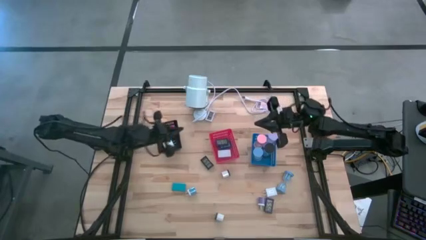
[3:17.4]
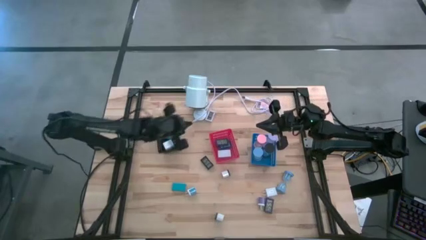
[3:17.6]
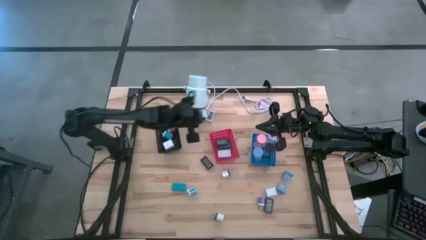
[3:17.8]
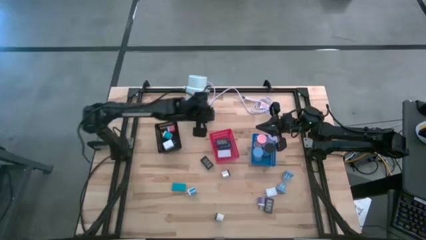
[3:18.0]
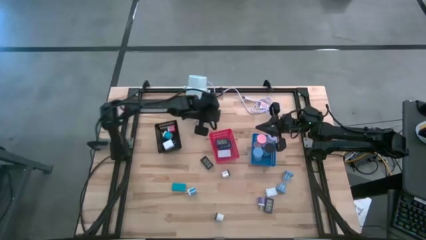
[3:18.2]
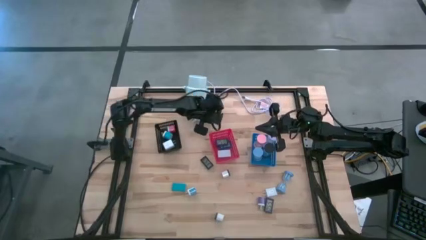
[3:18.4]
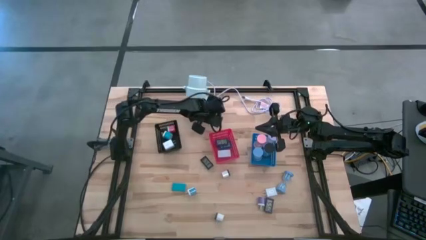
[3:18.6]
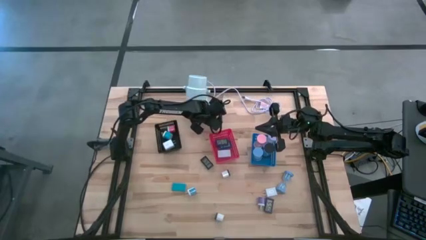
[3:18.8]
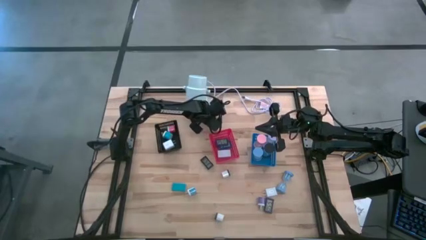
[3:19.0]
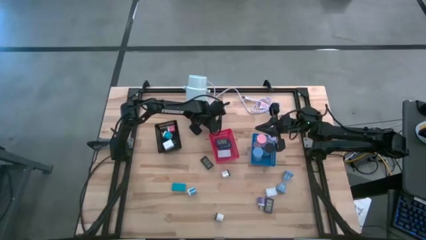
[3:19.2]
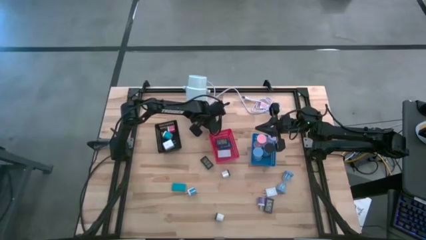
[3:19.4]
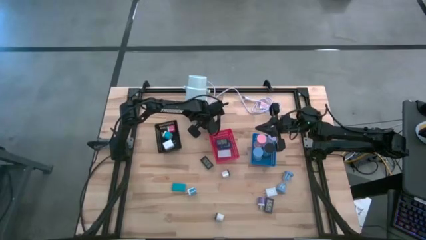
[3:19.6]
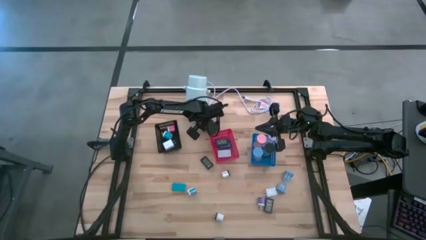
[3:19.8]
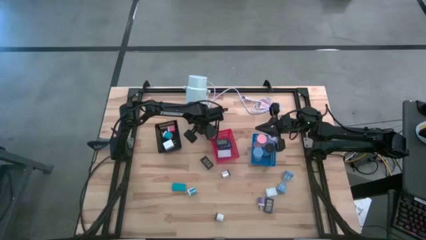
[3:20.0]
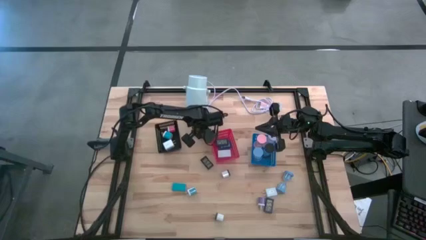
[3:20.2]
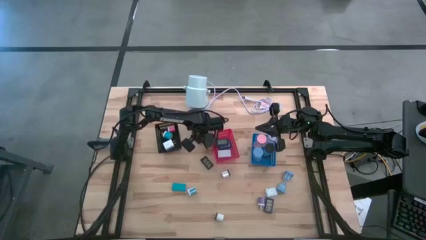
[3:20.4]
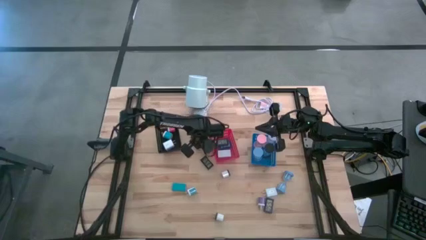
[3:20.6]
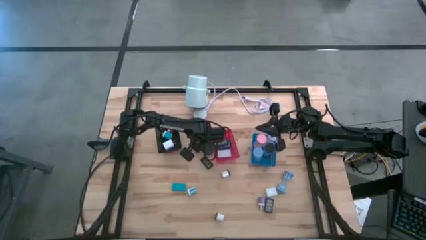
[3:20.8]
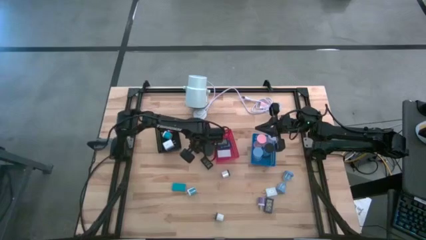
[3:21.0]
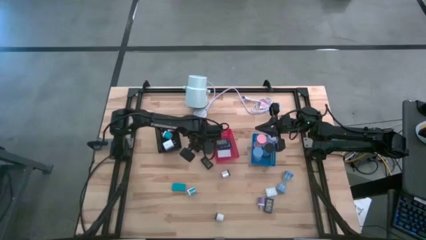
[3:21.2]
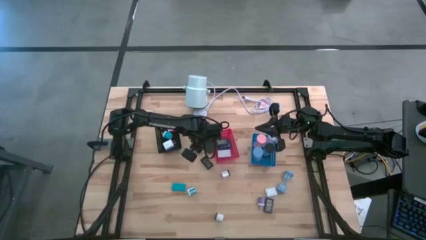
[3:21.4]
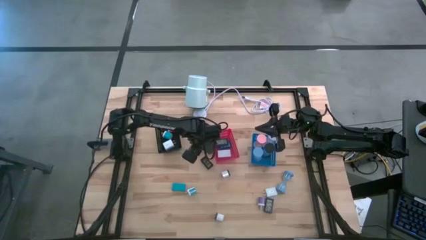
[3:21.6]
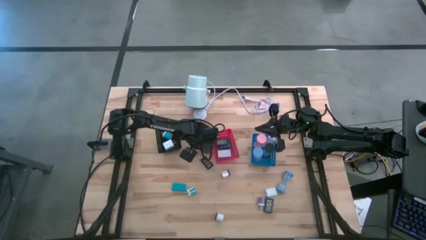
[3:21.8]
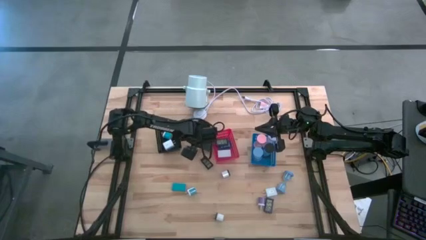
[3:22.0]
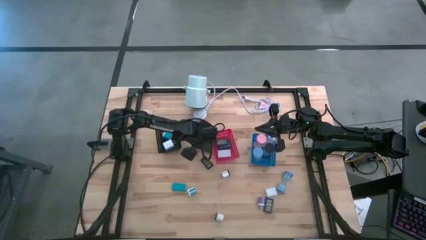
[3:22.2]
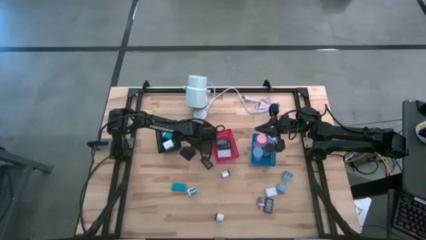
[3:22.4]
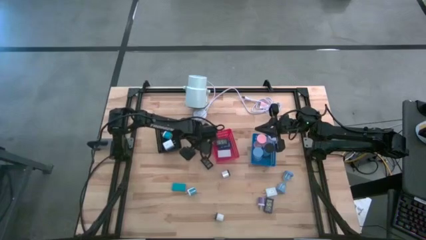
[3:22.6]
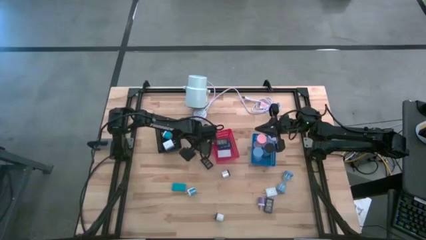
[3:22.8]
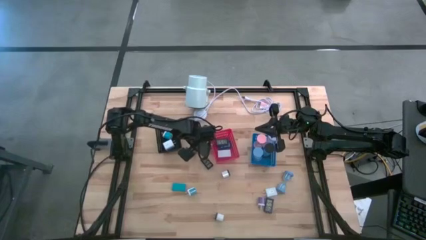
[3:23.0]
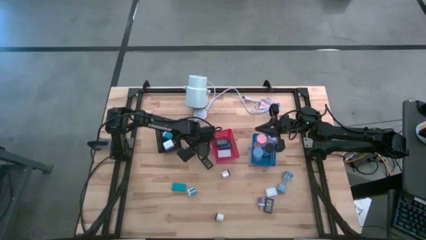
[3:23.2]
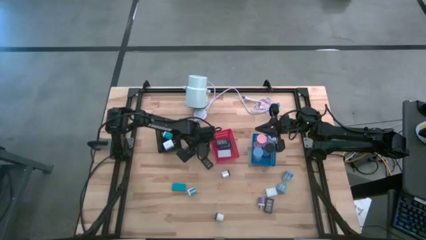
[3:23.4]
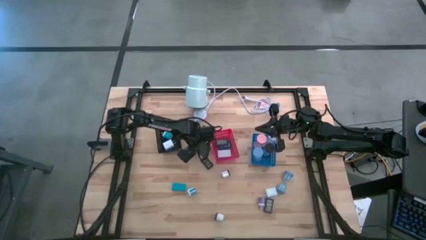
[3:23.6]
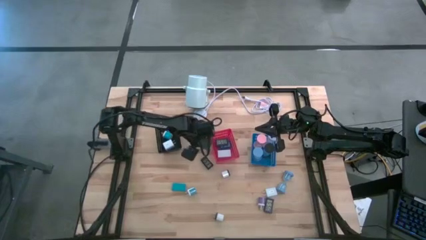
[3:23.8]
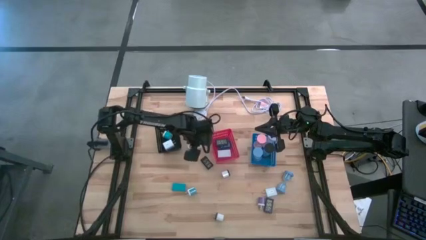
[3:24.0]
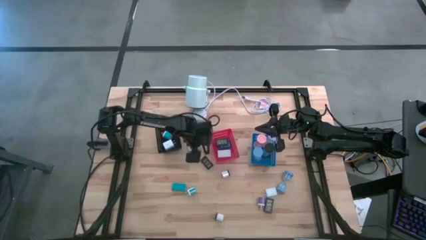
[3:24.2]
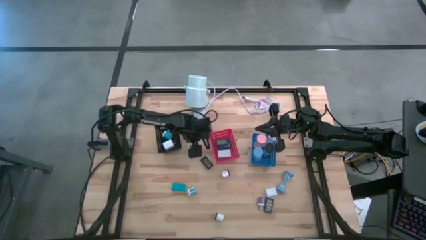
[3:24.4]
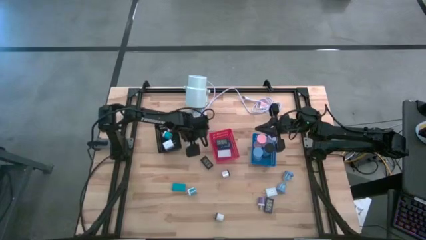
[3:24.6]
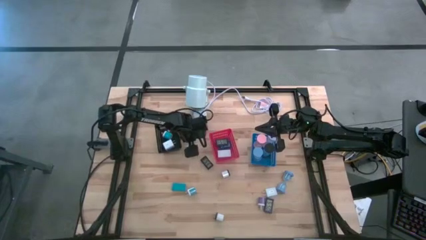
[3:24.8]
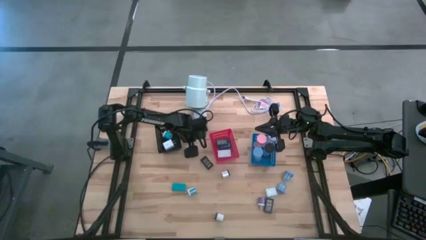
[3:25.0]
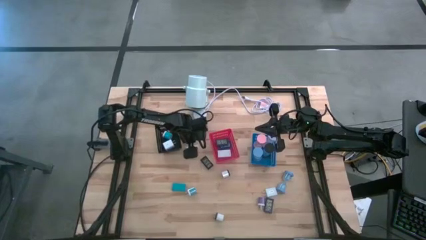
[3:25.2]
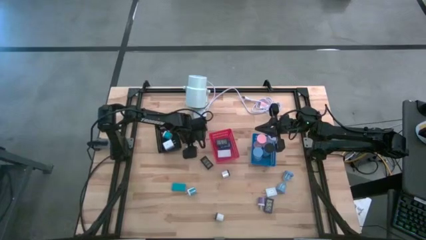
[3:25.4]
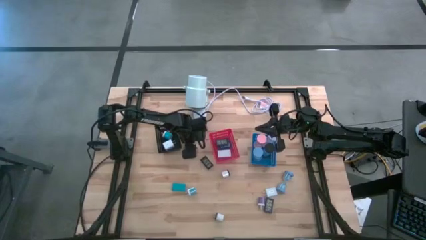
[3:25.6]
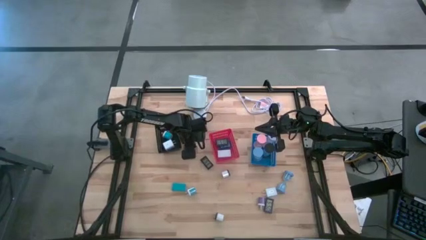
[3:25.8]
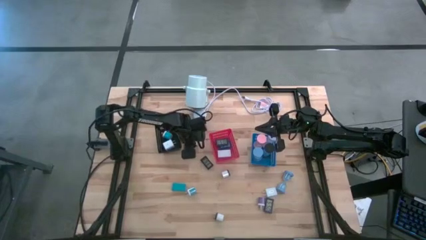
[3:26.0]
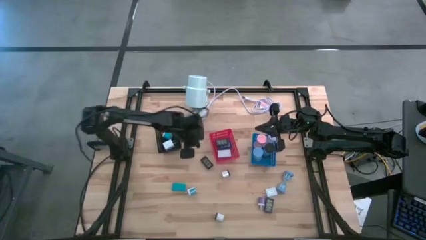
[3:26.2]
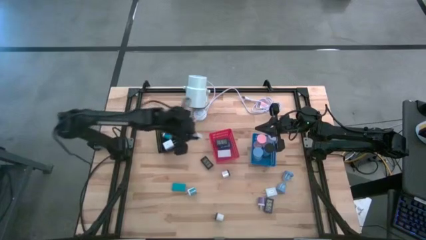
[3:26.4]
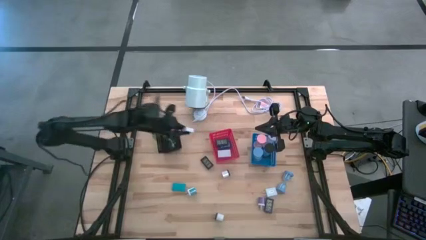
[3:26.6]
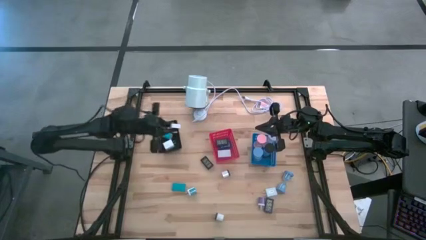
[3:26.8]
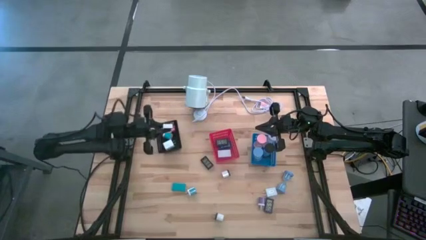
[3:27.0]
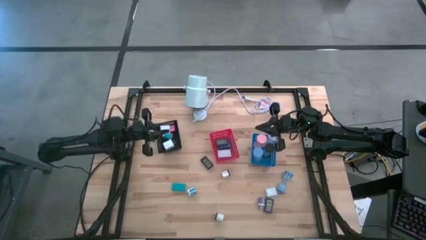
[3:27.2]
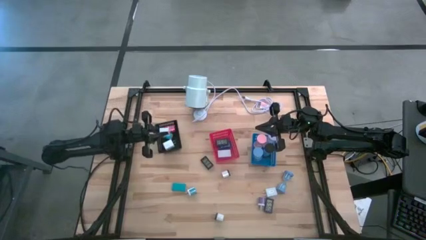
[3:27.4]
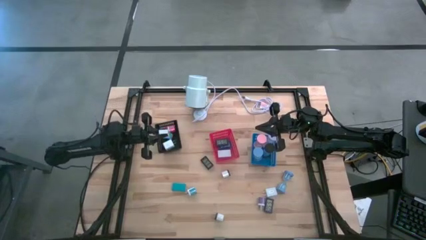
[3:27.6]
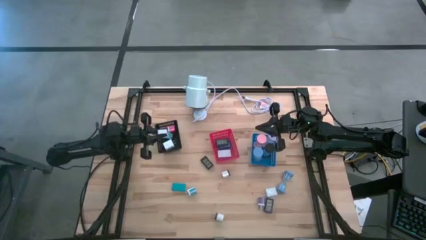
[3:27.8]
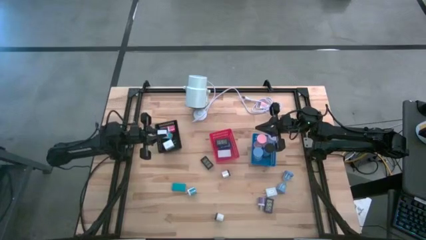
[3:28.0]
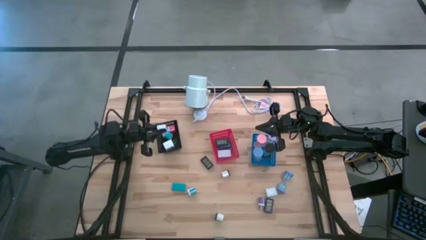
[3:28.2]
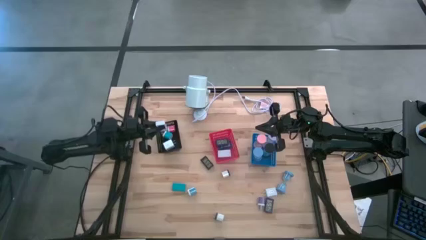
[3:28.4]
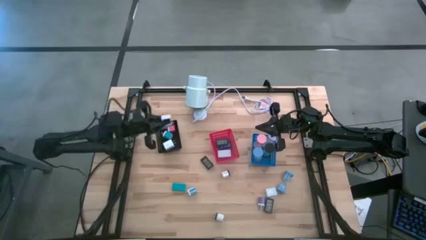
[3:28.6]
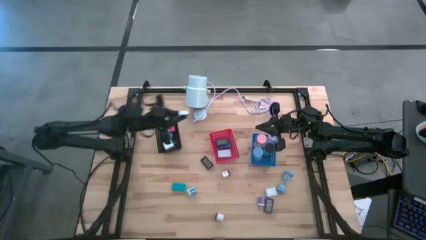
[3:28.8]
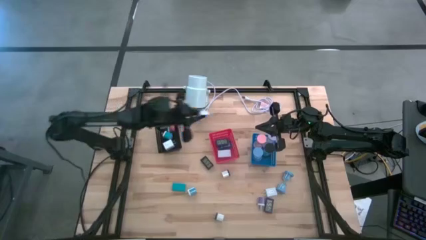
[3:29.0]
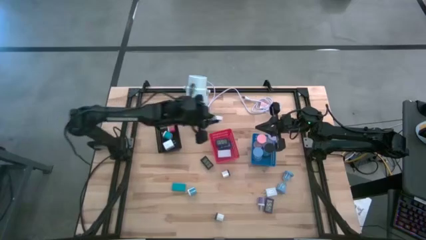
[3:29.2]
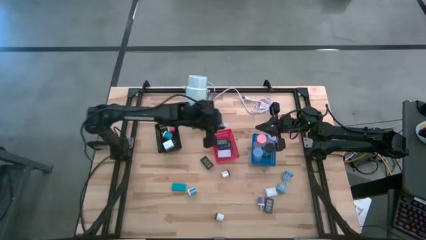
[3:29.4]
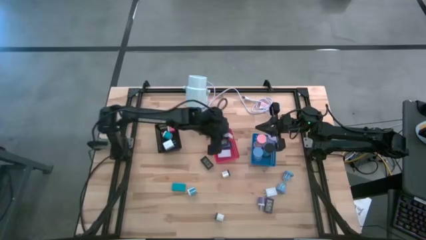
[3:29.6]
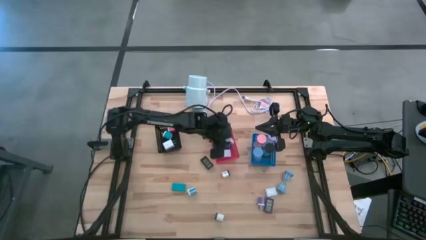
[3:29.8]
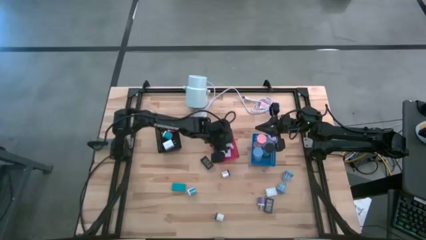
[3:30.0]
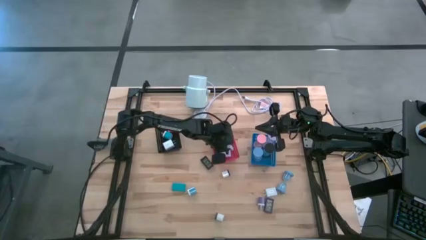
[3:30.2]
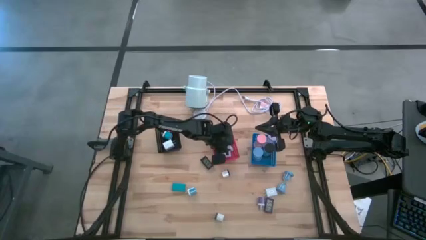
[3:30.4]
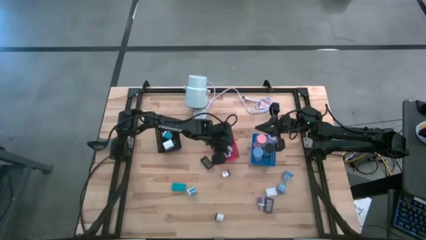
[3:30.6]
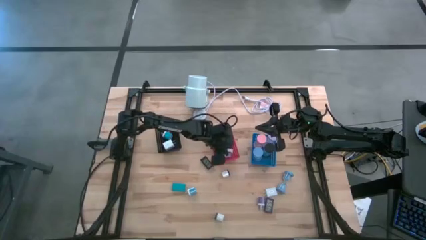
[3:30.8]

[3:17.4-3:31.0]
Task: Pick & Place Office items
Put the white digital clock into the red bin

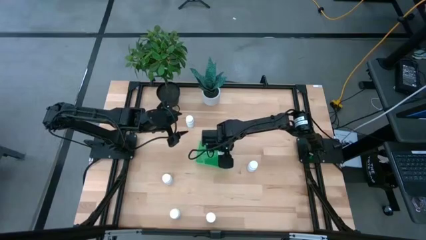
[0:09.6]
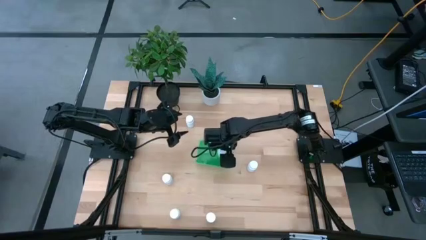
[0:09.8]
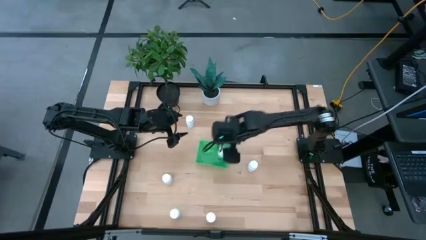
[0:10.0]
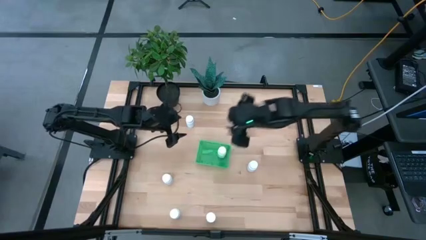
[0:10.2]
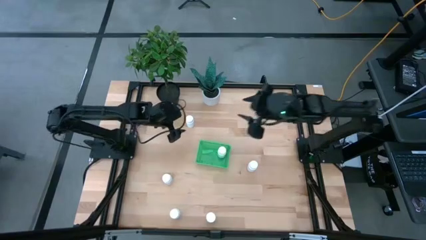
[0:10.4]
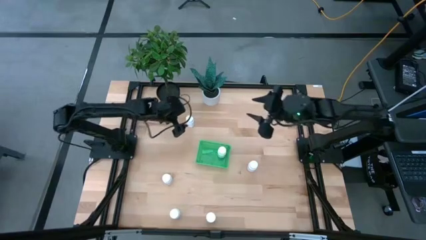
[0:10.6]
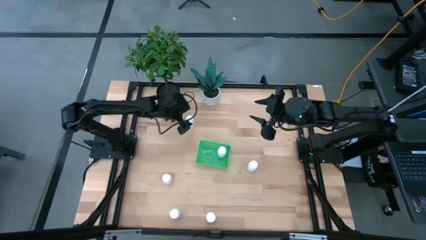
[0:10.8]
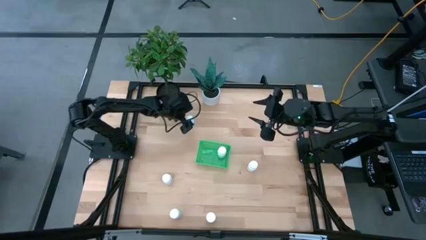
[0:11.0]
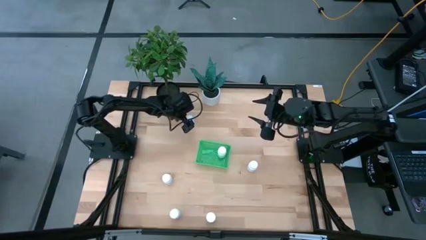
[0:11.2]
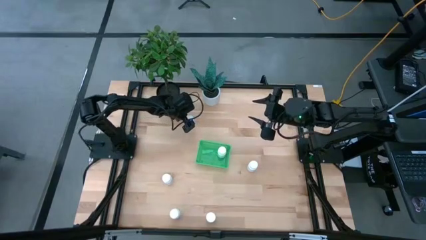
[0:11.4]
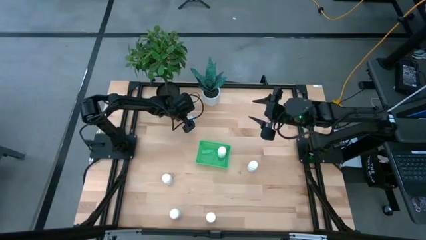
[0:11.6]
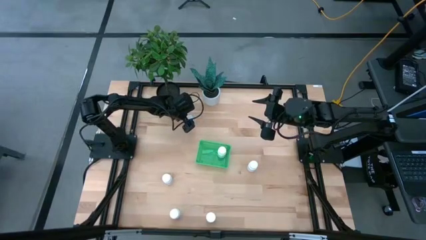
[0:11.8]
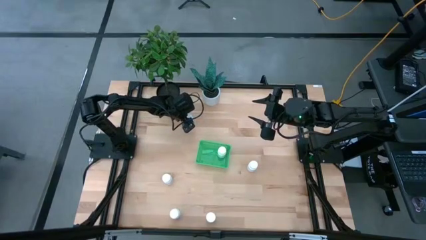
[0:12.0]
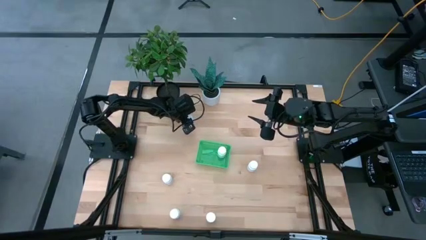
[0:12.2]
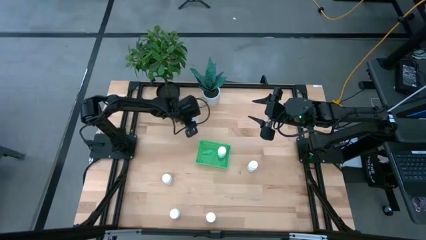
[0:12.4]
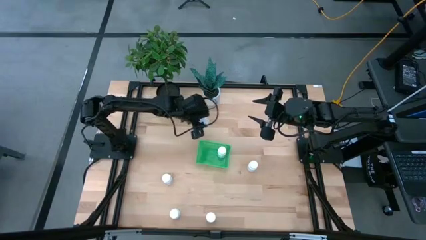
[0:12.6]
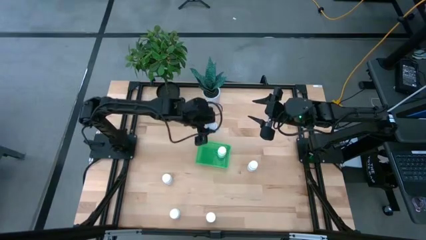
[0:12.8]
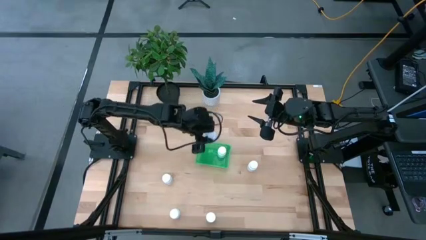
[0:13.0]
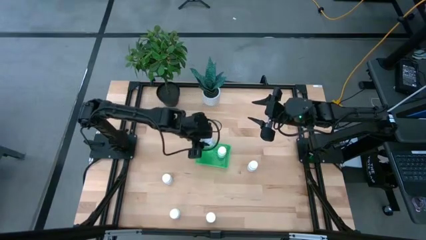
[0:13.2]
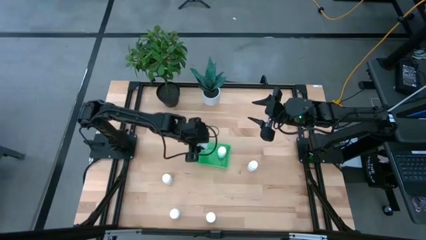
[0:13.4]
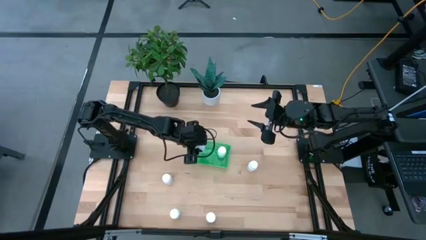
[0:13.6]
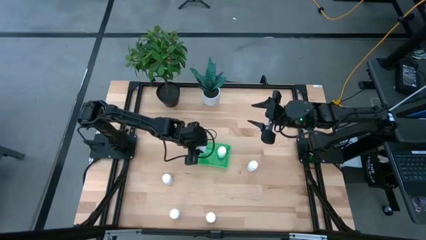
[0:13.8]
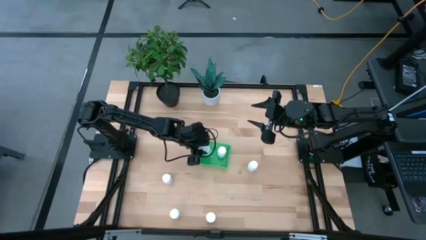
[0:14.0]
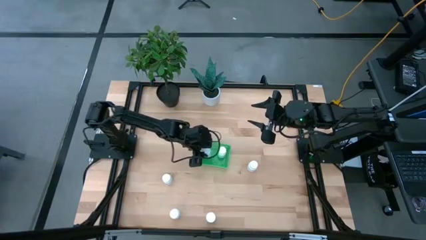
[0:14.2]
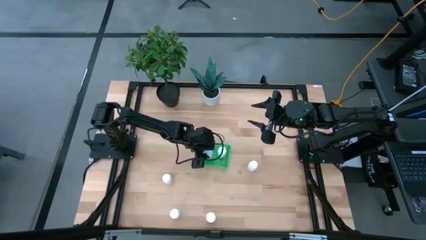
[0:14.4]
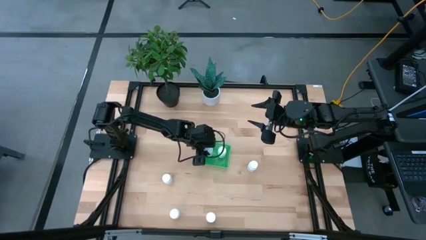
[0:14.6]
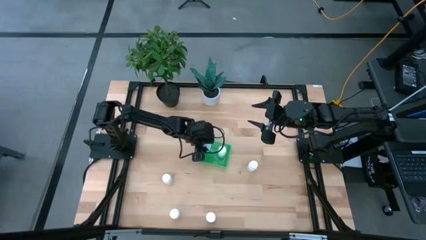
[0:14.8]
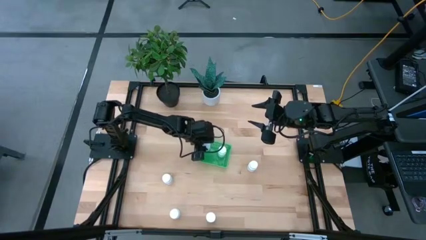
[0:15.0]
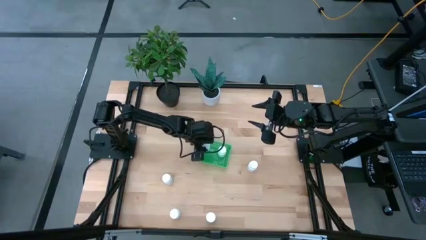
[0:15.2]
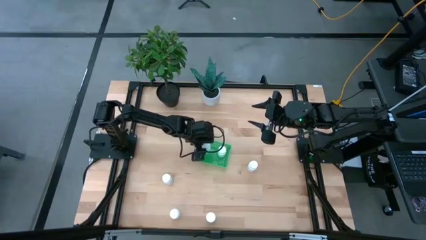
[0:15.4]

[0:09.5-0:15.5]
Task: Pick and place pill bottles into a basket
Put the pill bottle into the bin
